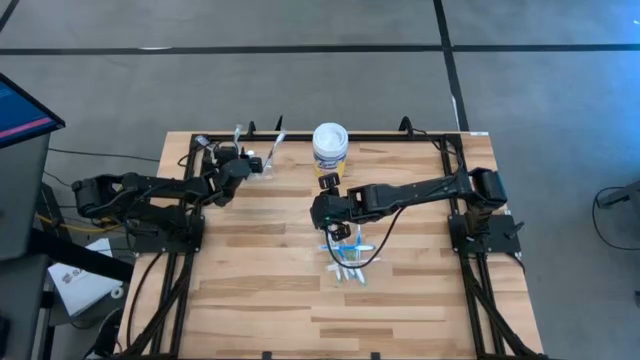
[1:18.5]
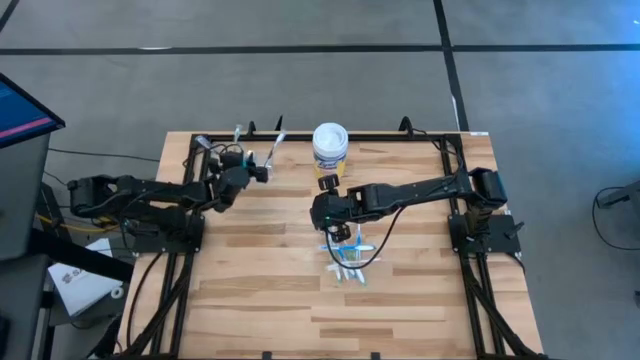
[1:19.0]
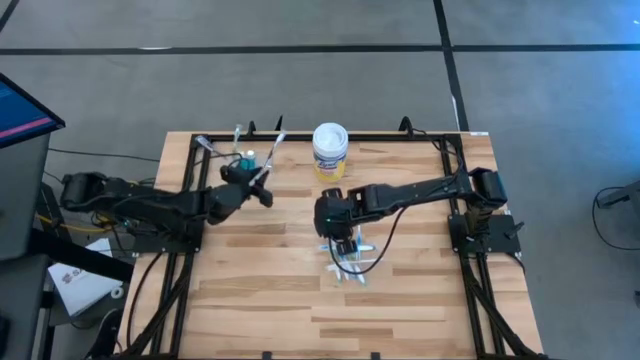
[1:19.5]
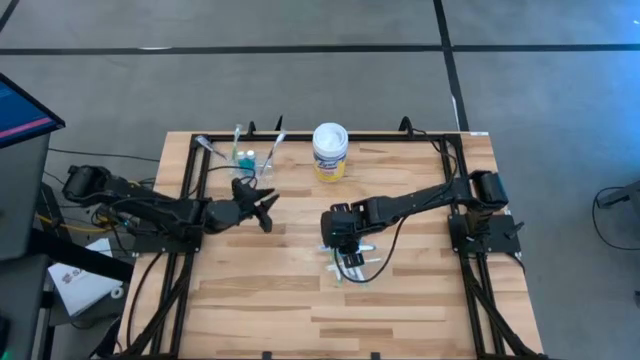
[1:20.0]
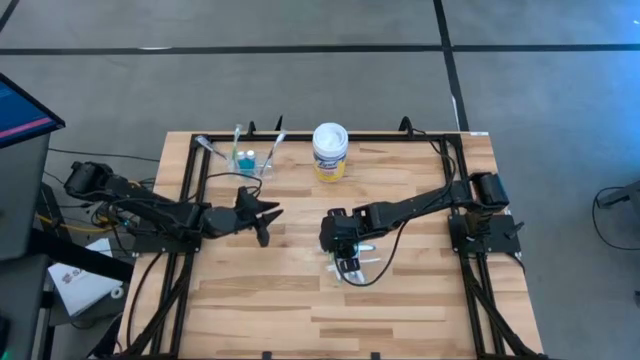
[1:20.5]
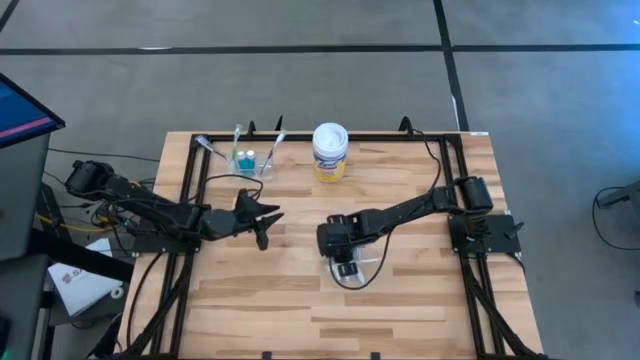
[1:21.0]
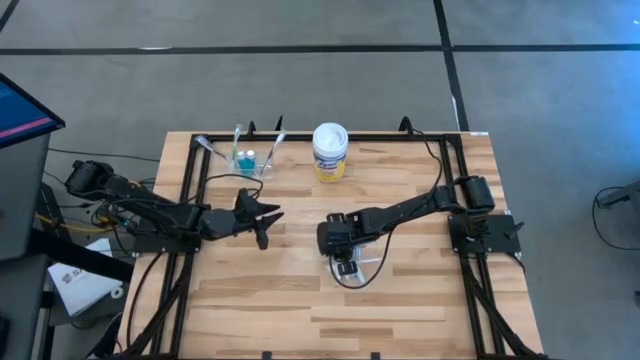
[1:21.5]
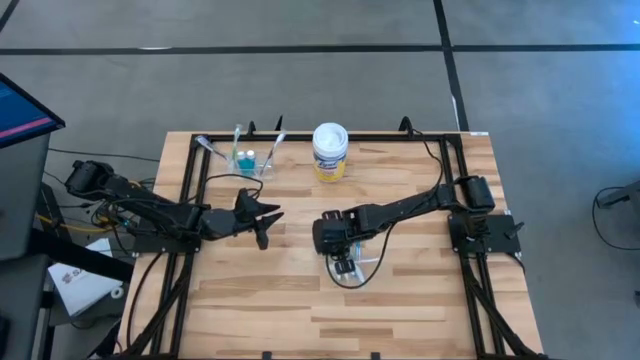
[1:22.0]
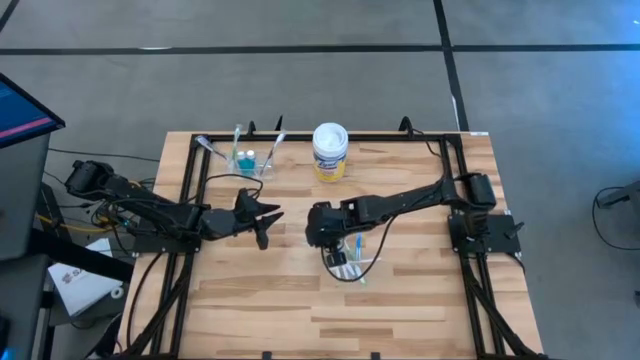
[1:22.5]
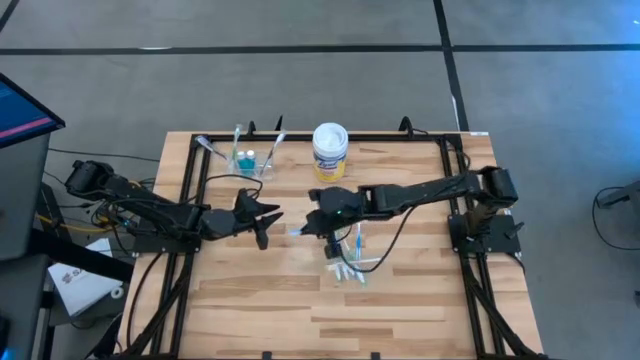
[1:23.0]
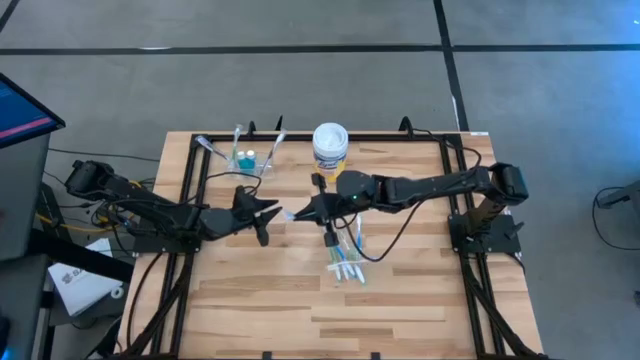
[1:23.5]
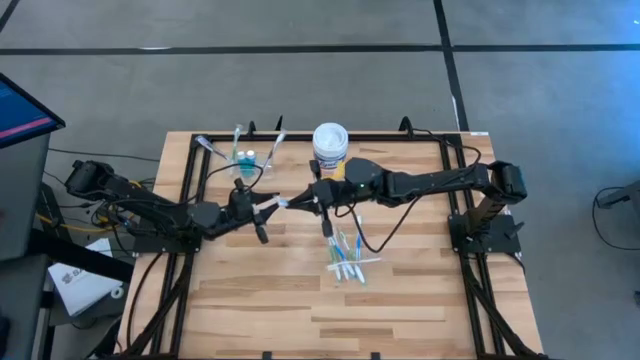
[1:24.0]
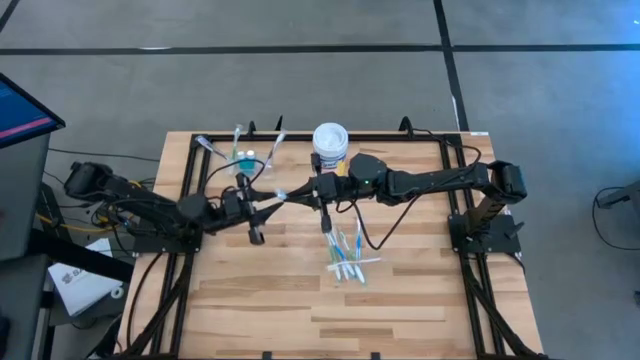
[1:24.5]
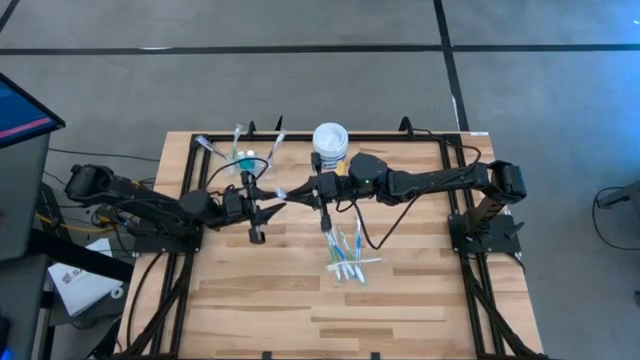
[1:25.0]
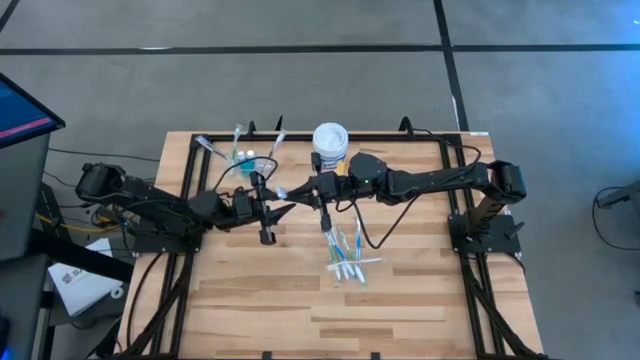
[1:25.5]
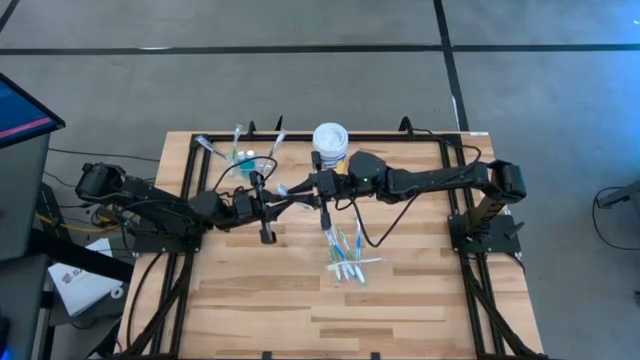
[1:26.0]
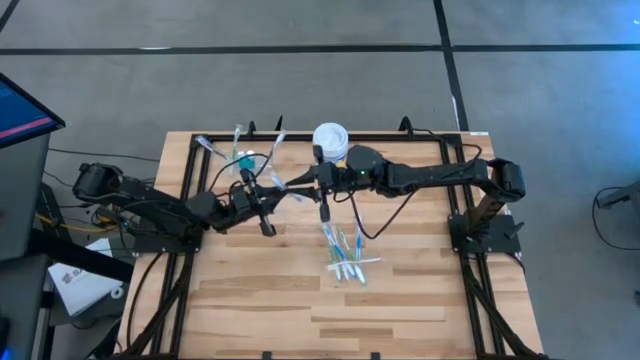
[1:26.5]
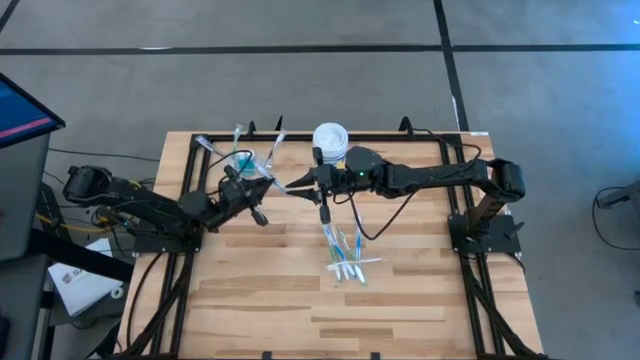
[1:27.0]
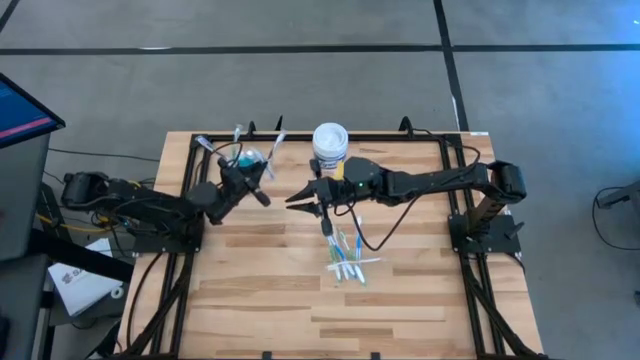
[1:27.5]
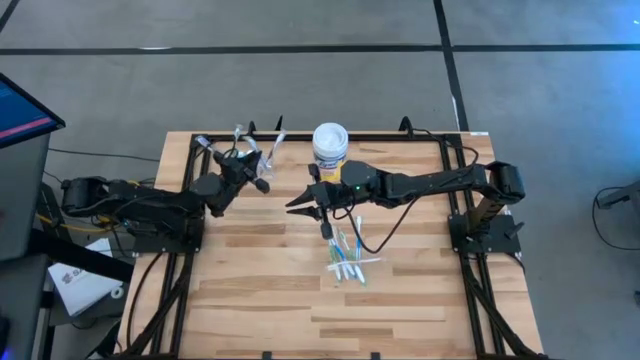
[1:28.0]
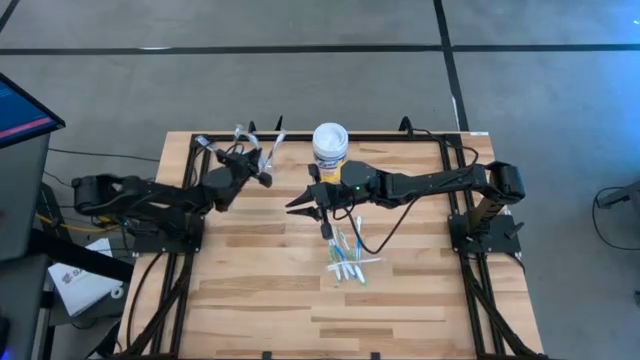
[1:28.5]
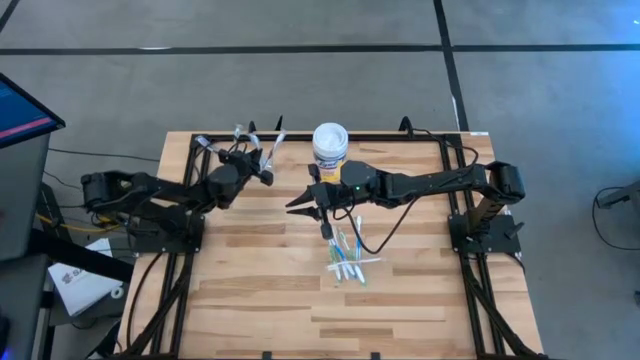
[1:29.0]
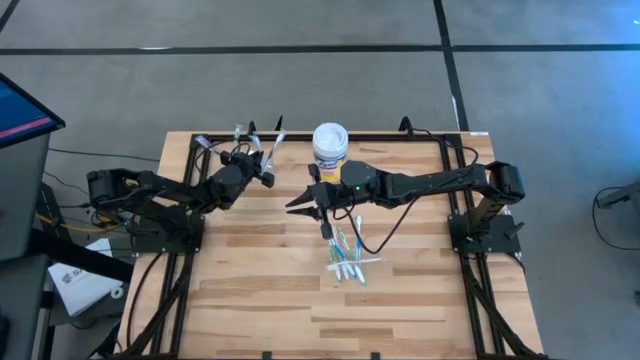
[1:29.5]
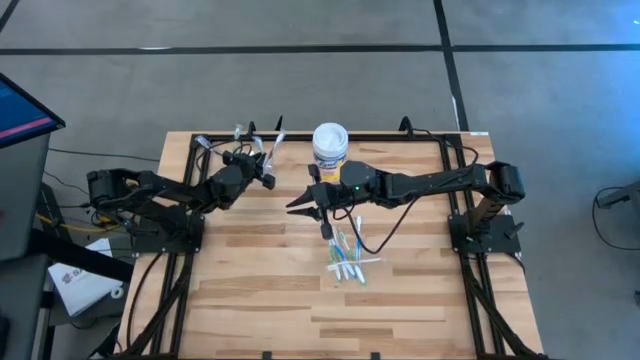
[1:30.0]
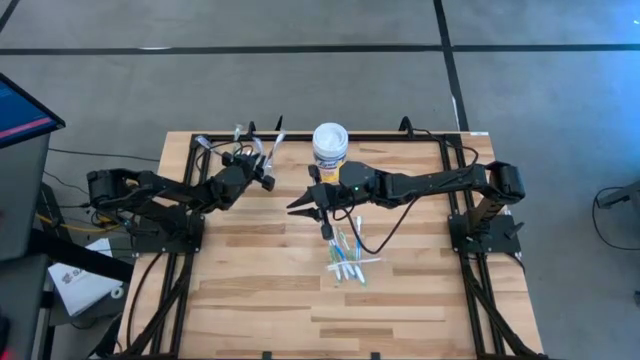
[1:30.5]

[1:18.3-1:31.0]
Task: Pick & Place toothbrushing station
Put the blue toothbrush into the transparent organizer

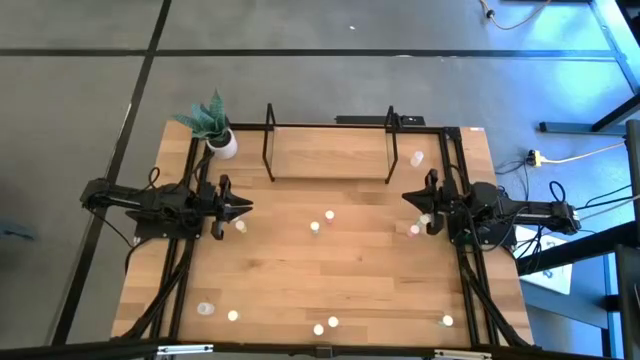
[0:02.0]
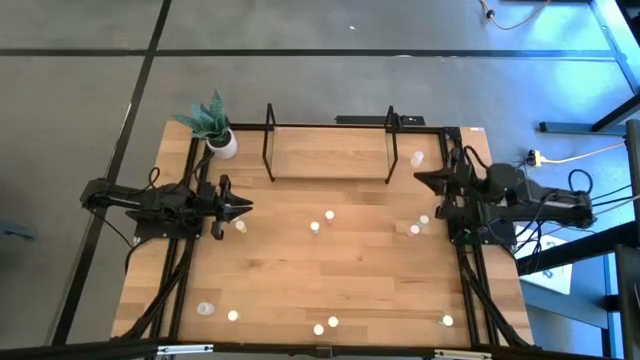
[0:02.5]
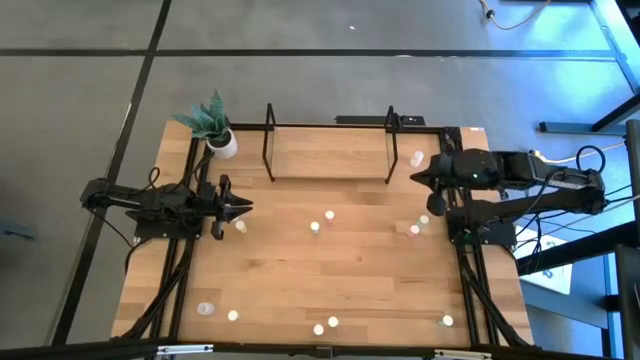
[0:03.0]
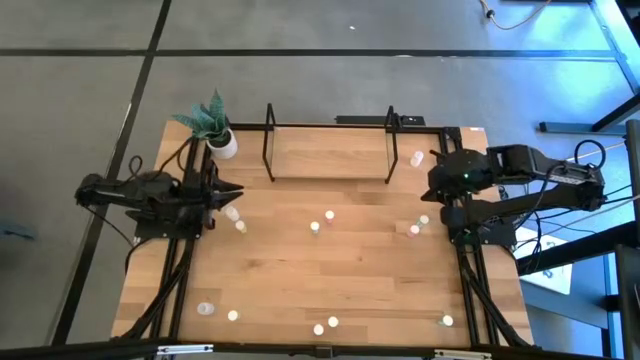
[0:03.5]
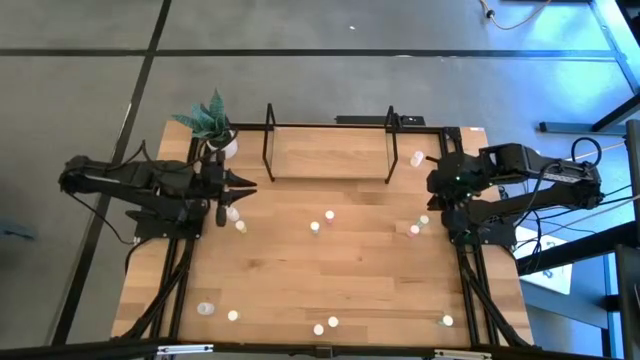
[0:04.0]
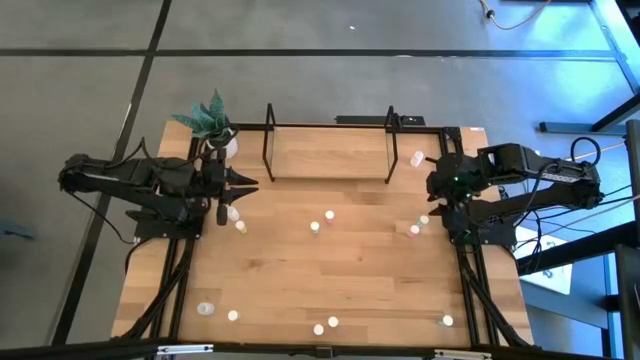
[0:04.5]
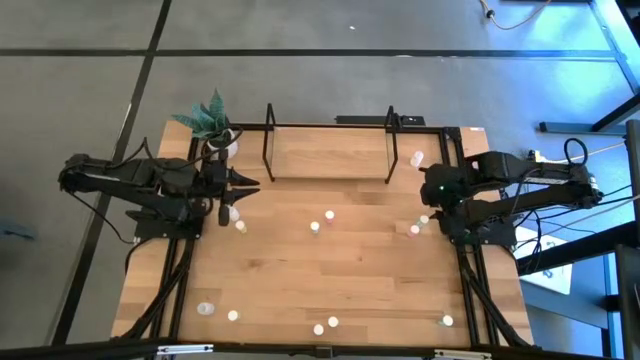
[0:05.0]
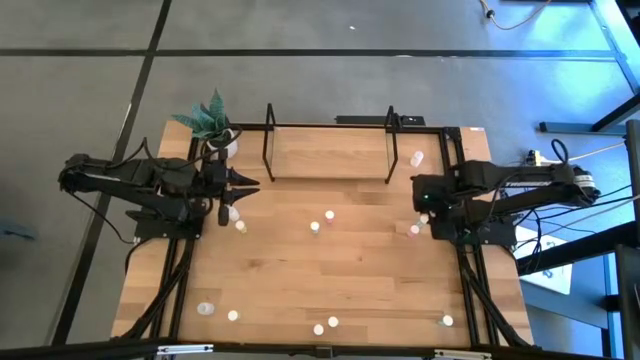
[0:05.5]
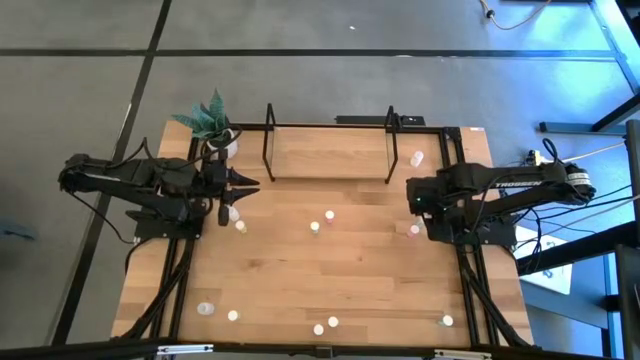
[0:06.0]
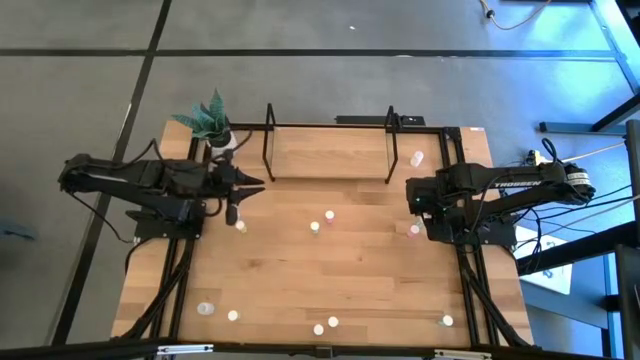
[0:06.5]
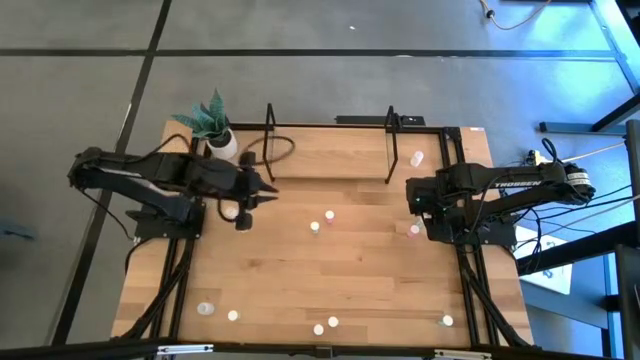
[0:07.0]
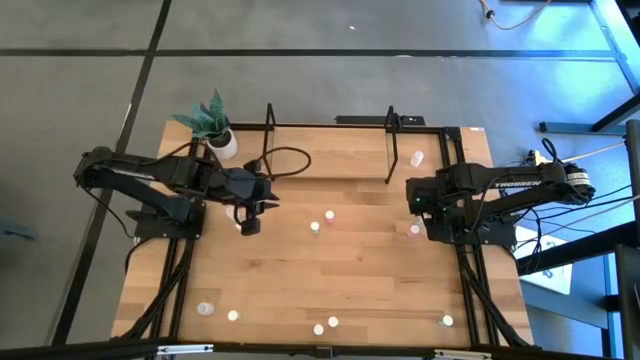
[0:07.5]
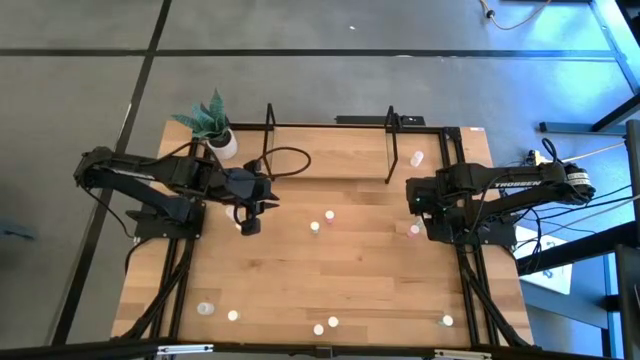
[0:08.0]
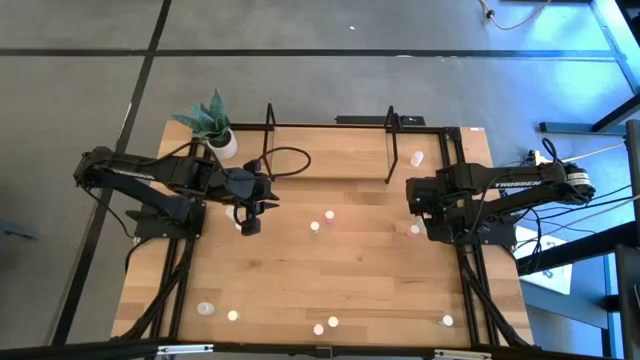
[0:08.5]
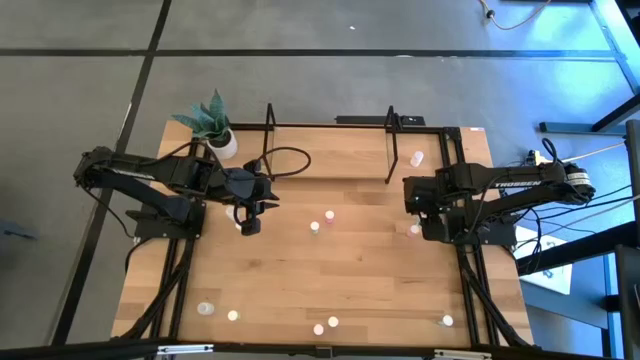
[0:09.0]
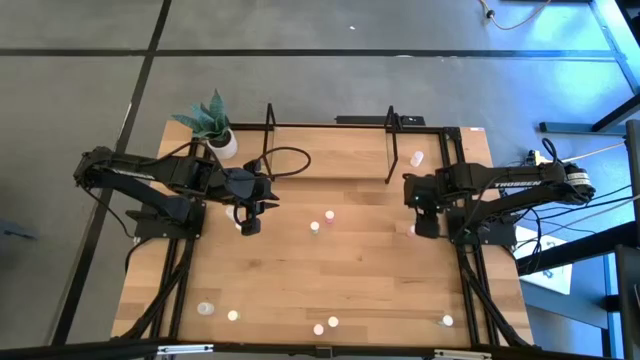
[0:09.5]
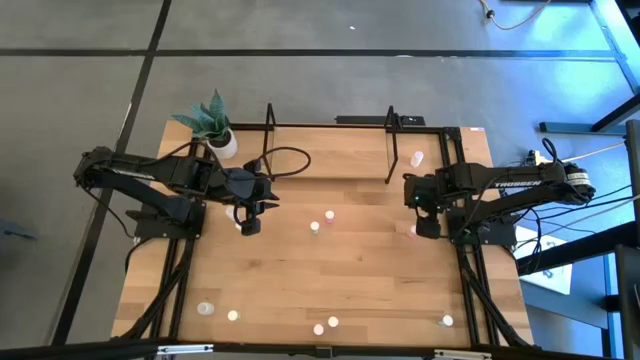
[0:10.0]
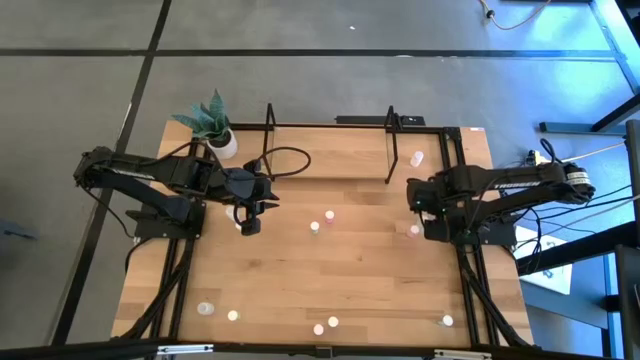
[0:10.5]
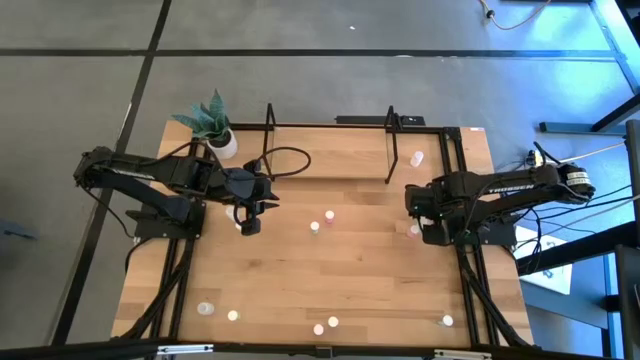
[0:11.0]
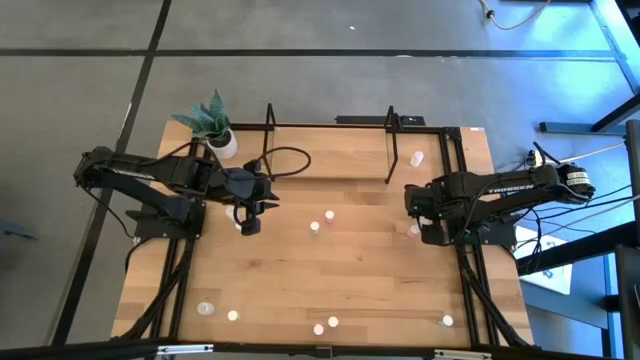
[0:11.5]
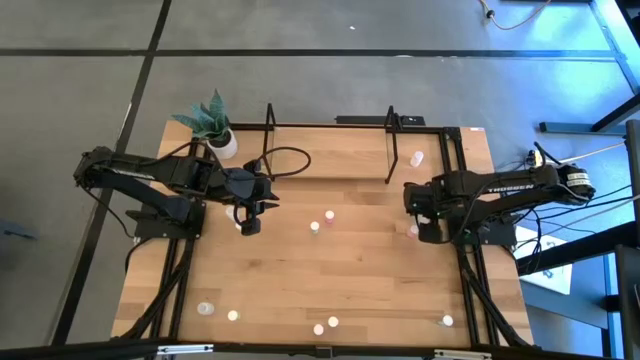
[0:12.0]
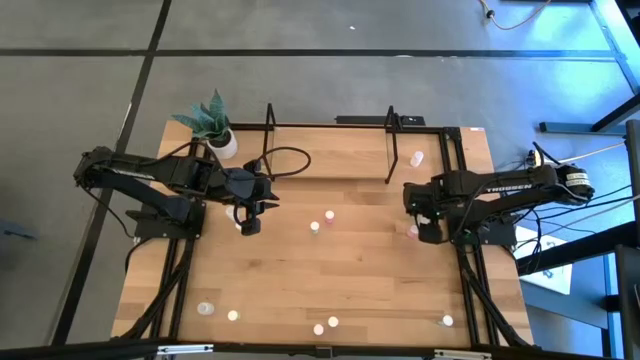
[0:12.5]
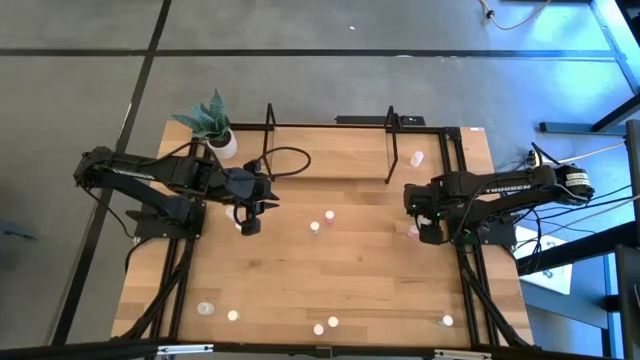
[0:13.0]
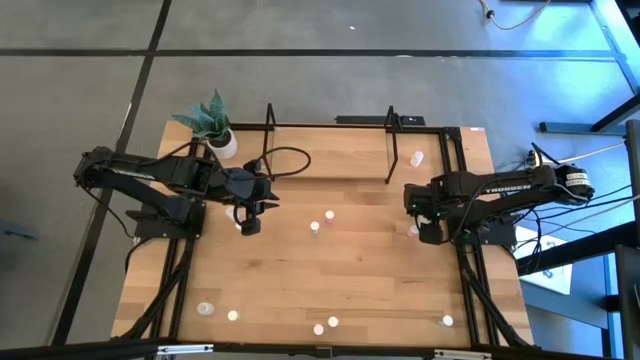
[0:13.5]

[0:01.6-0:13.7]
Task: Pick and place medicine bottles onto shelf by color
Put the top right blue pill bottle on the shelf
